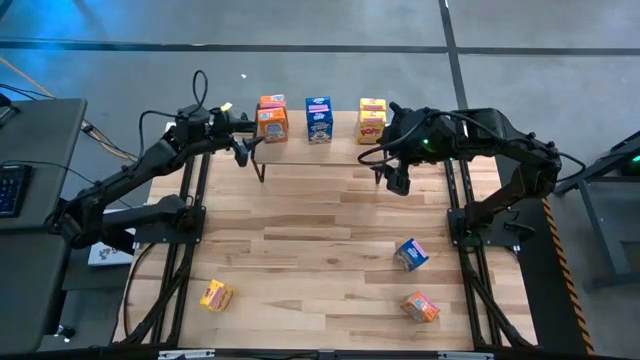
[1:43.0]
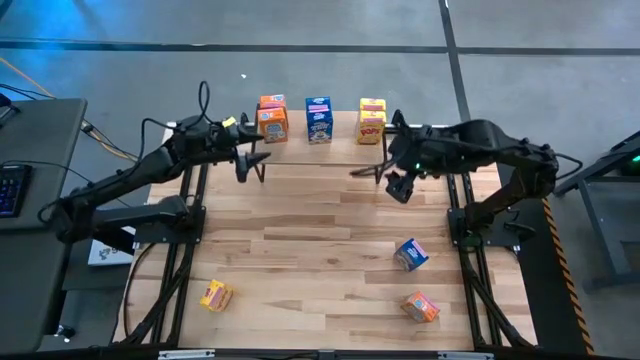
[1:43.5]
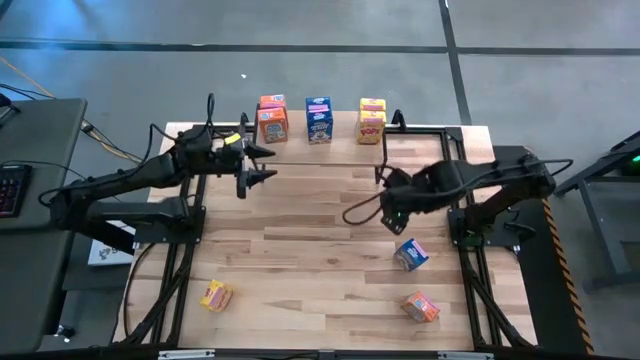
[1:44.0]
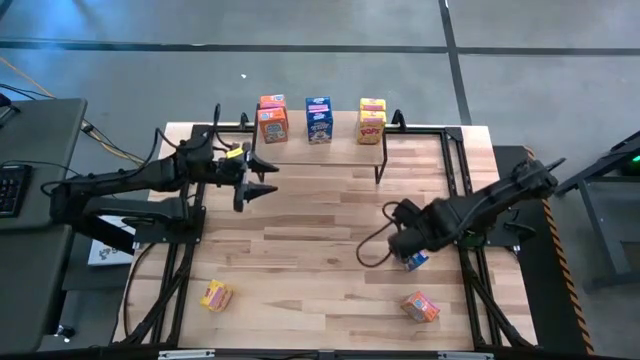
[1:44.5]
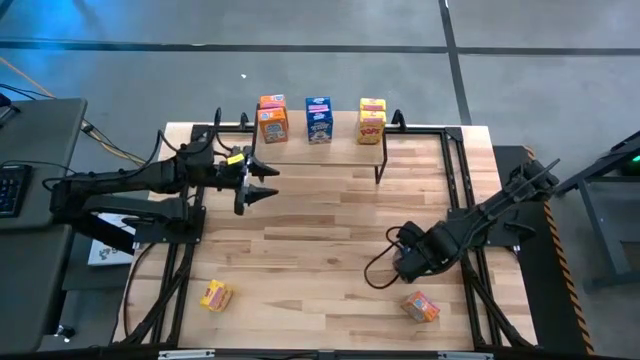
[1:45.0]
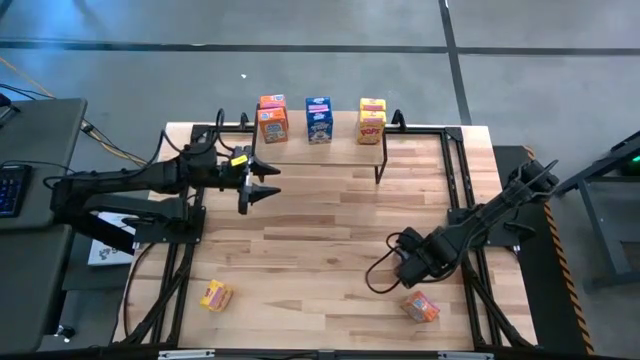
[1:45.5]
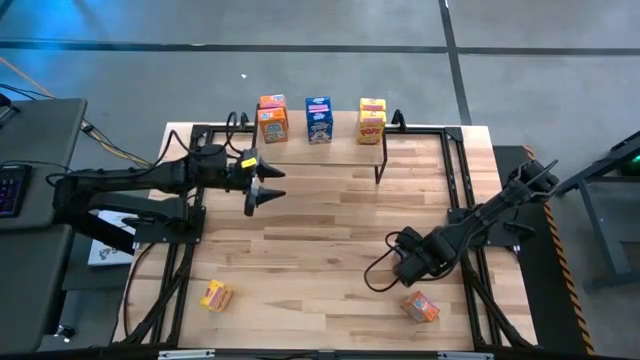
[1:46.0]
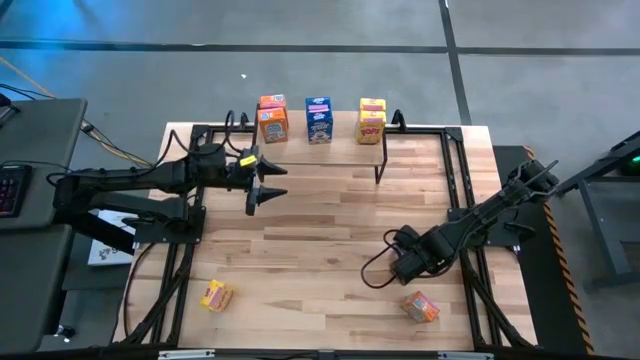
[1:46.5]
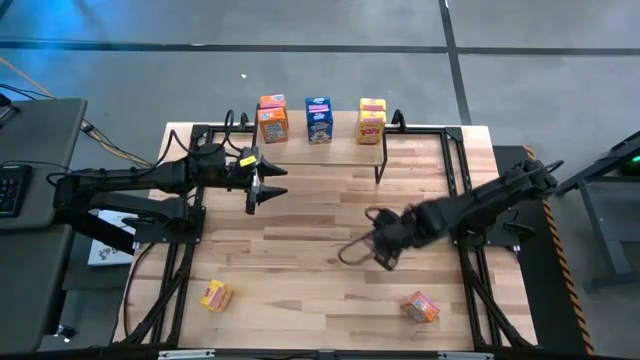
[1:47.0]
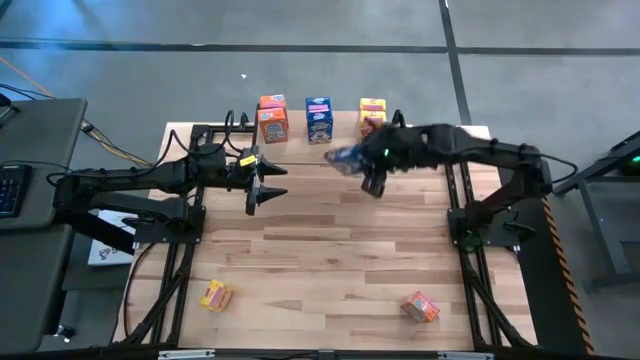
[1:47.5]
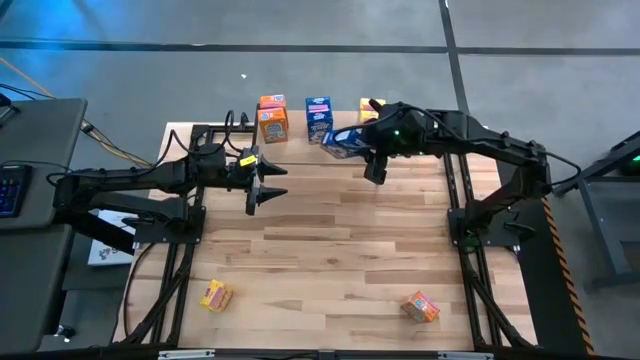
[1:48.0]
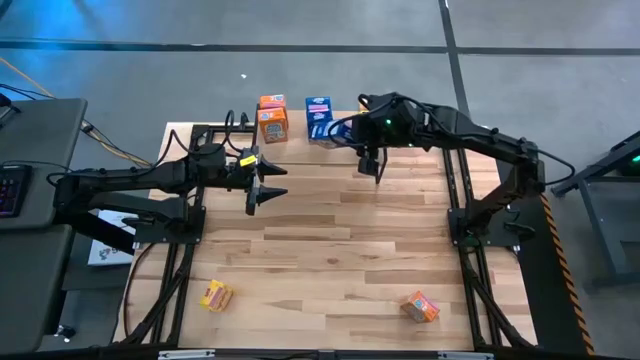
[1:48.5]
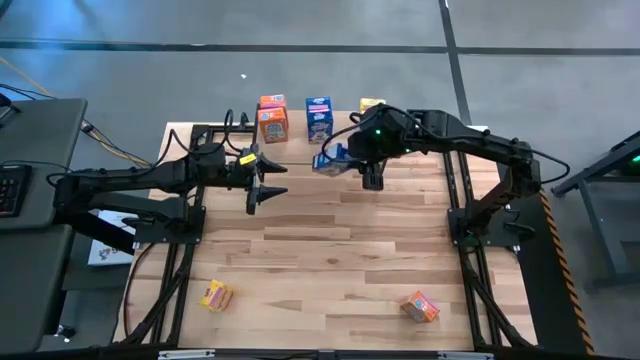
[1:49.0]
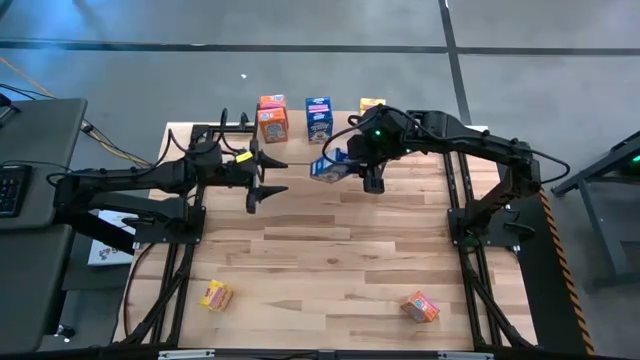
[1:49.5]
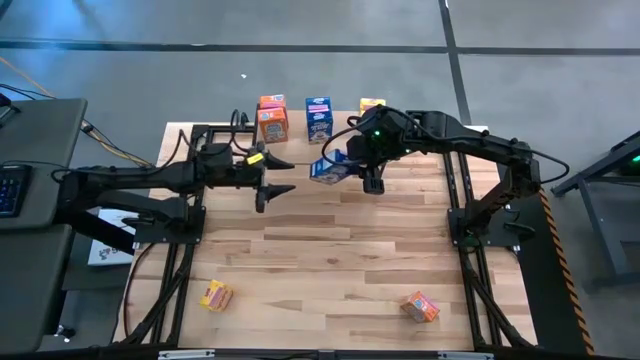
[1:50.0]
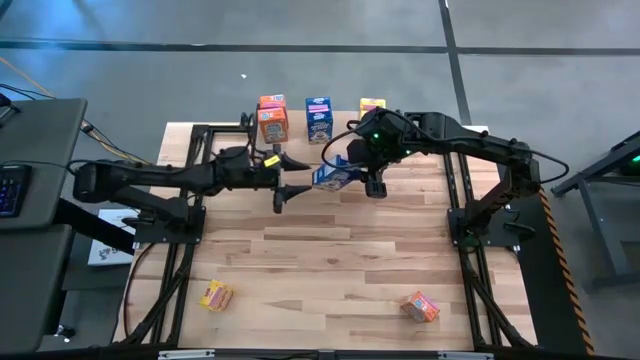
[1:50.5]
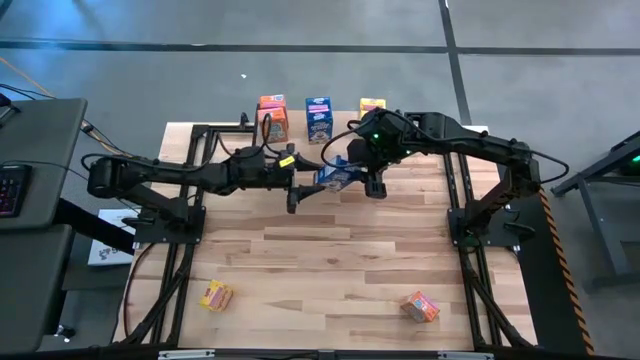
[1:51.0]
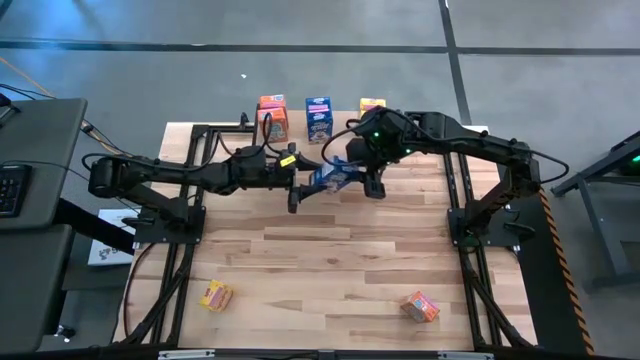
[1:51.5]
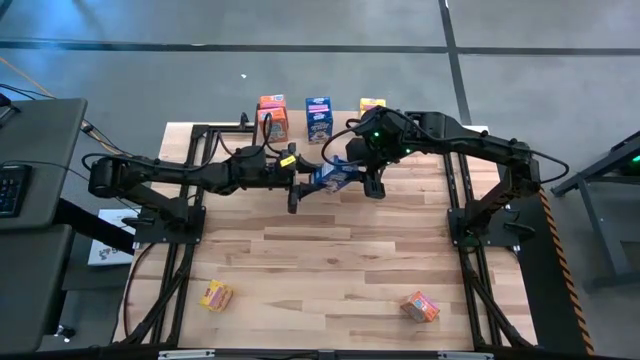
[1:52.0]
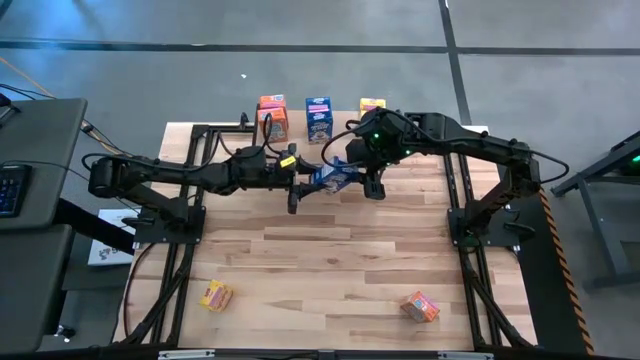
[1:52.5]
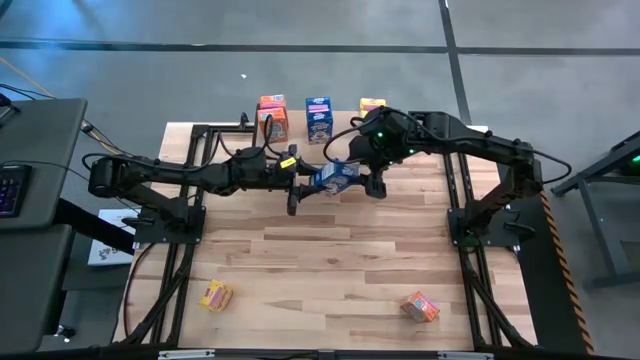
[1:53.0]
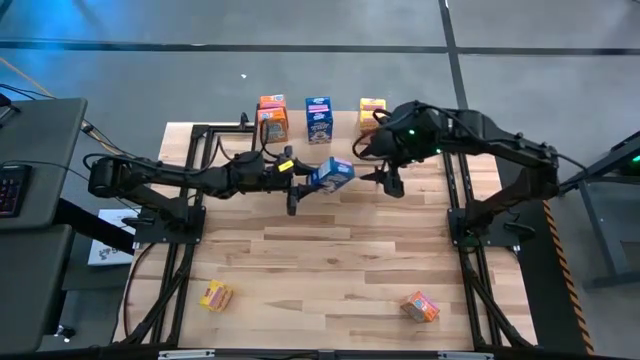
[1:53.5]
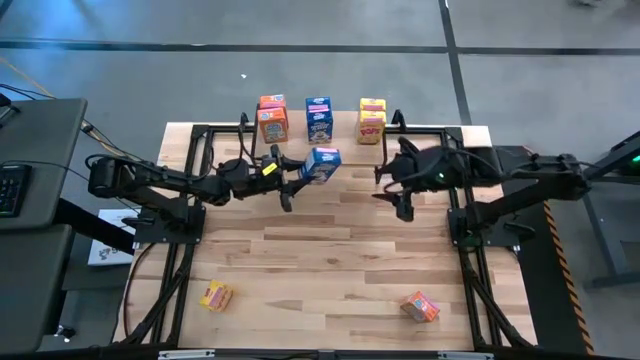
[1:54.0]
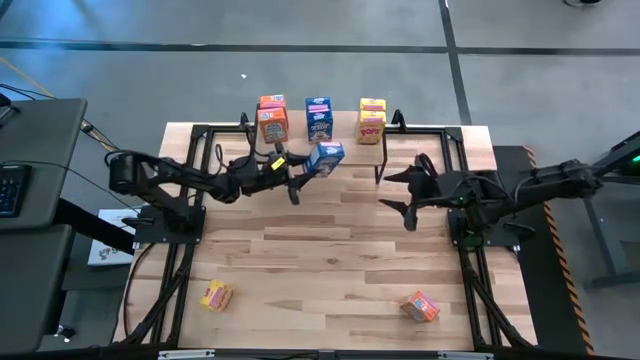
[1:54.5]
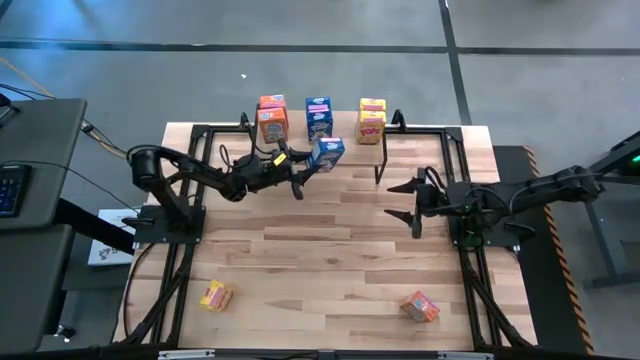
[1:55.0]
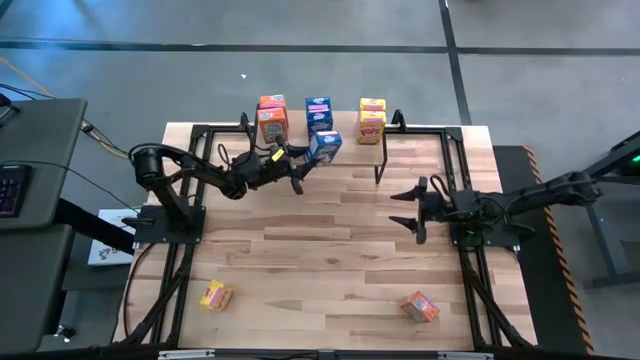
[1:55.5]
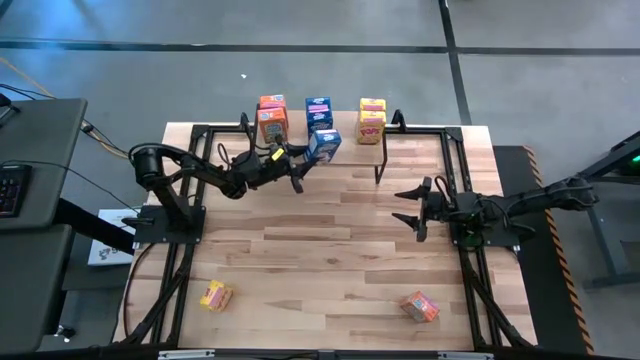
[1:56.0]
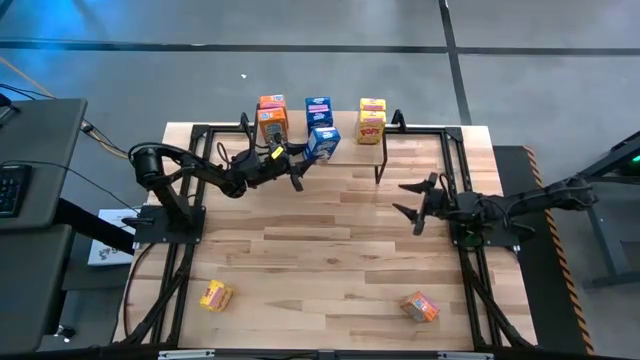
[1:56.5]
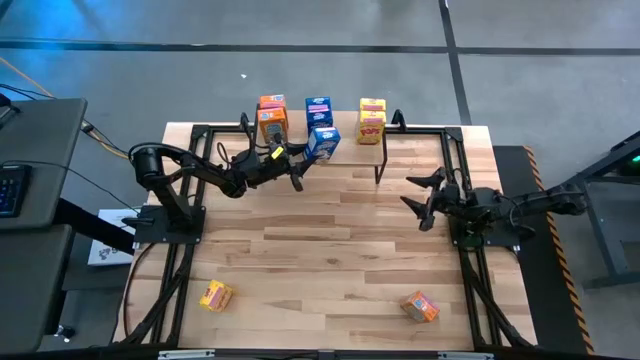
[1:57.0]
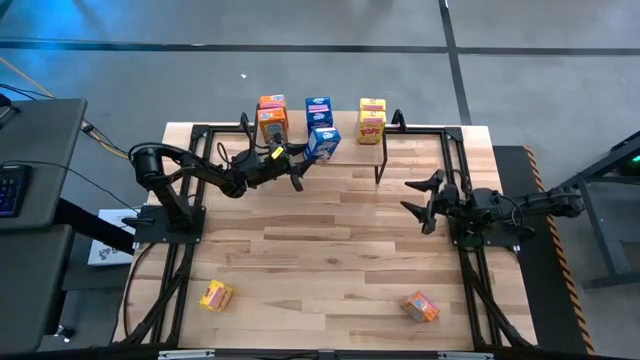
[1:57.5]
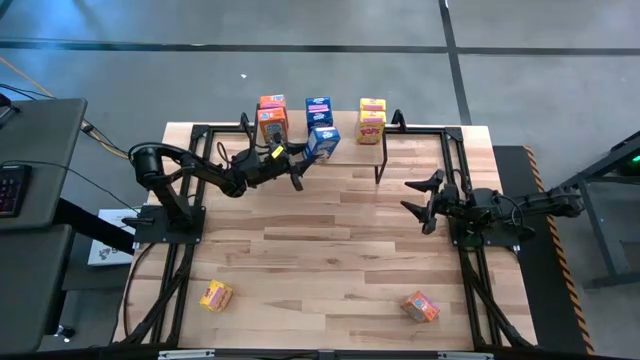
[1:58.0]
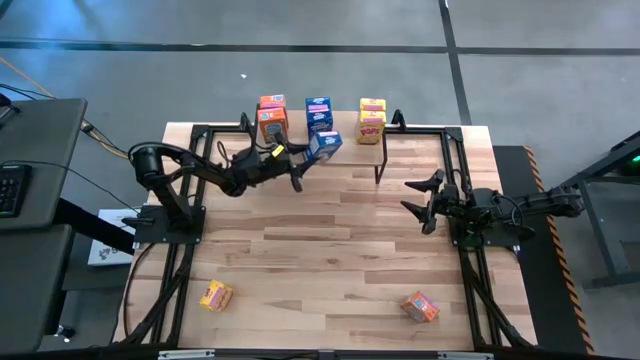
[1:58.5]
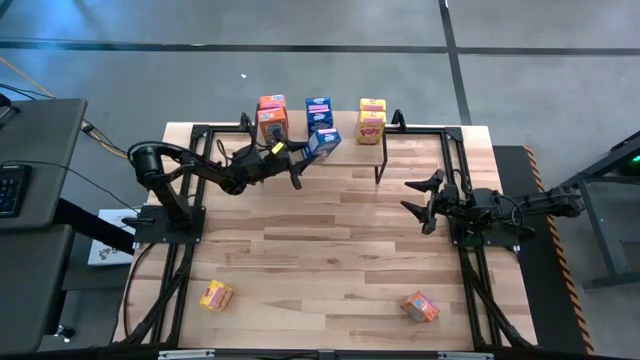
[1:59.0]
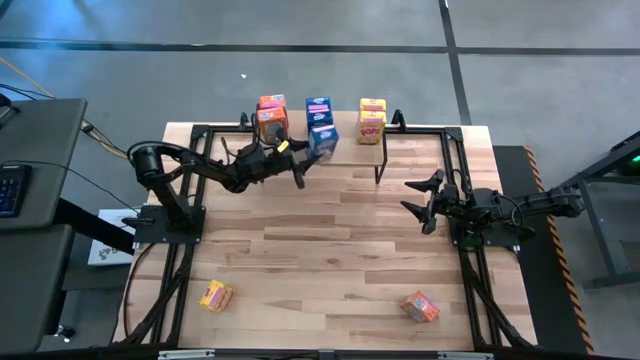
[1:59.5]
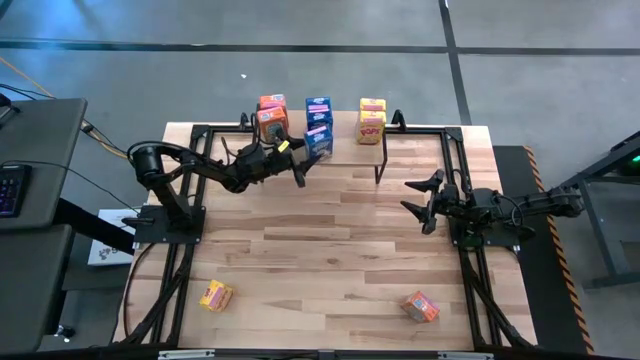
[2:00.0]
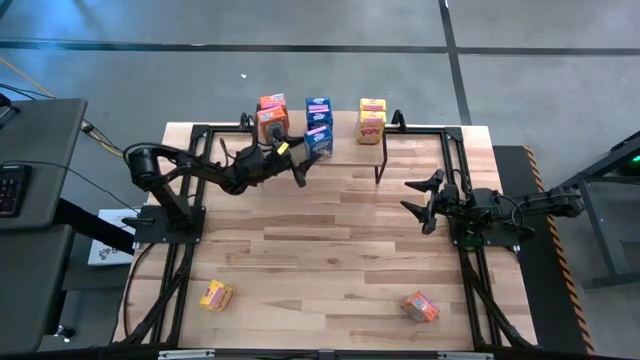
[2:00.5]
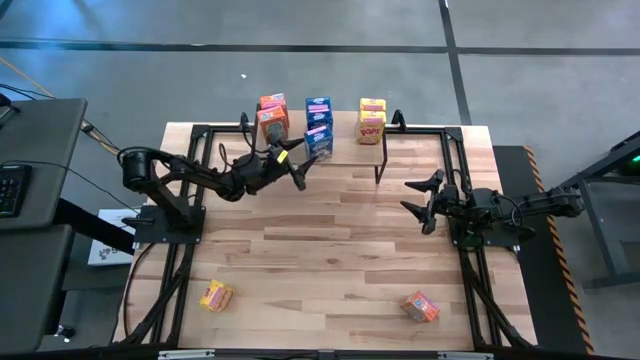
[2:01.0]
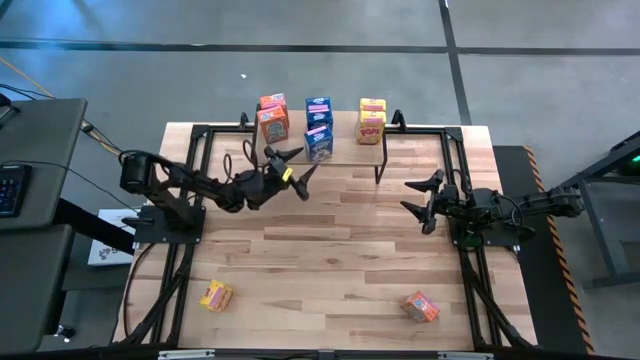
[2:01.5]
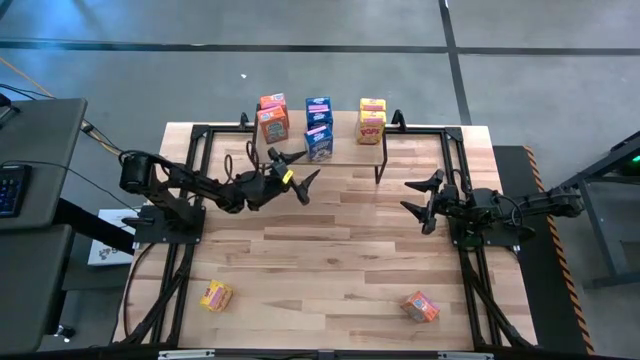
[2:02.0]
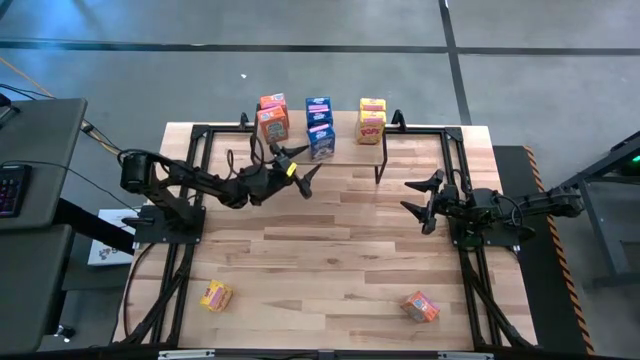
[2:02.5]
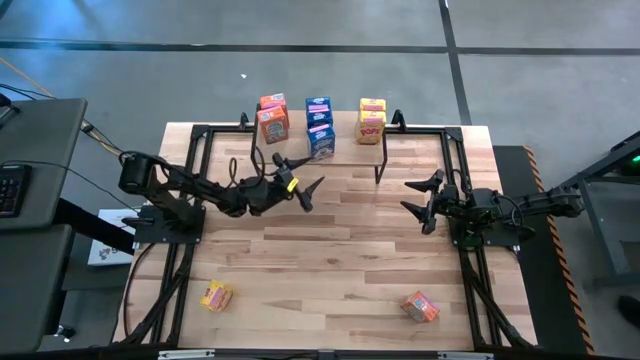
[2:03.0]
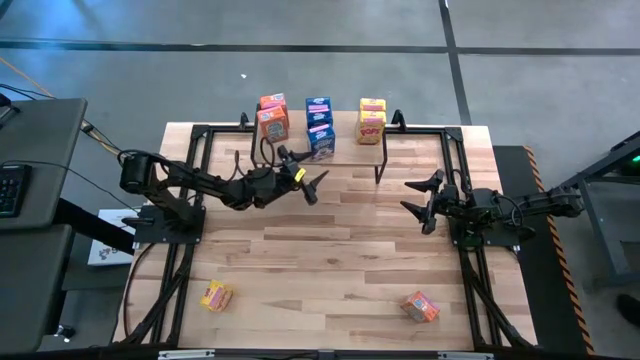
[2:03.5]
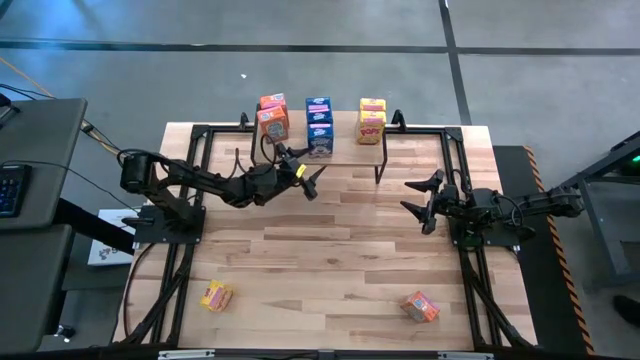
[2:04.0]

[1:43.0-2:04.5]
Task: Stack cereal on shelf
Put the blue cereal box on the shelf aligned with the other blue cereal boxes
